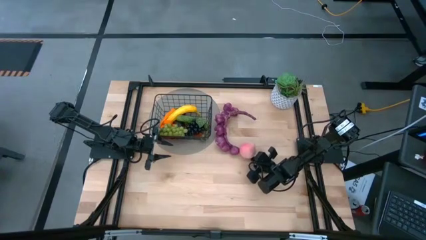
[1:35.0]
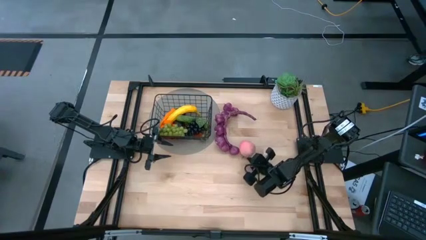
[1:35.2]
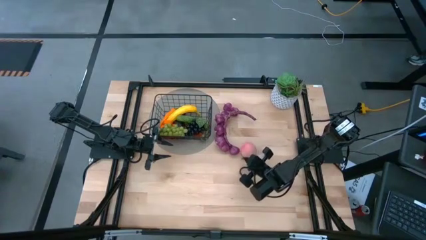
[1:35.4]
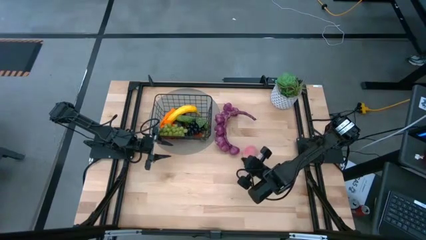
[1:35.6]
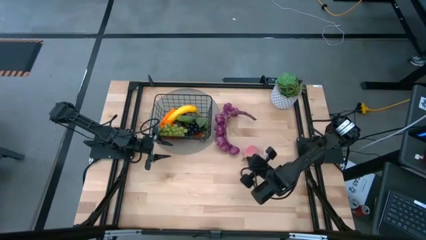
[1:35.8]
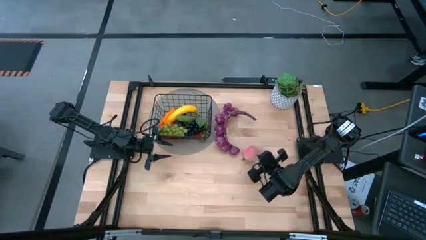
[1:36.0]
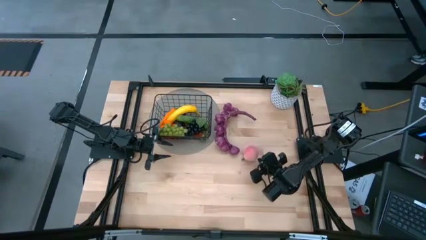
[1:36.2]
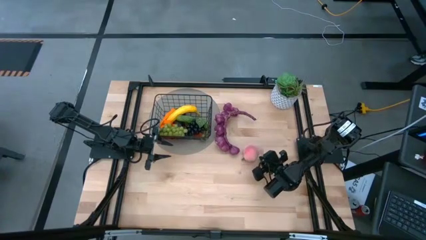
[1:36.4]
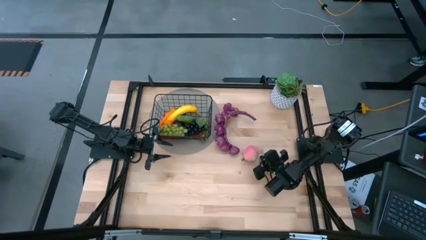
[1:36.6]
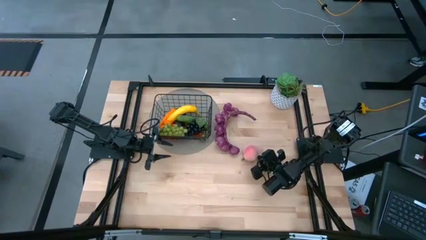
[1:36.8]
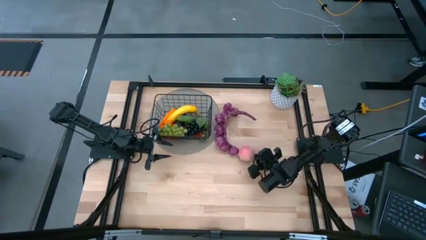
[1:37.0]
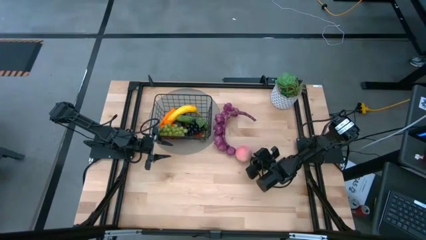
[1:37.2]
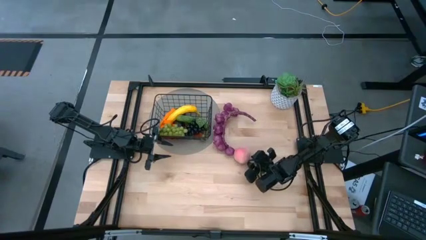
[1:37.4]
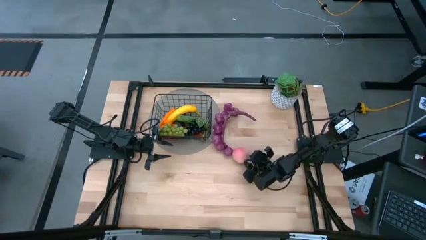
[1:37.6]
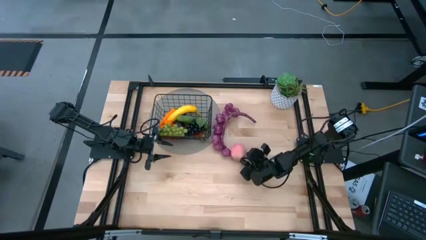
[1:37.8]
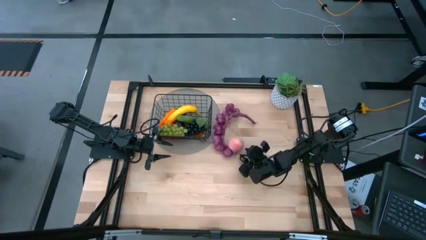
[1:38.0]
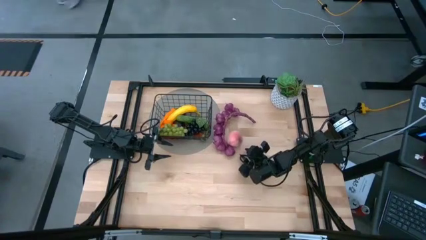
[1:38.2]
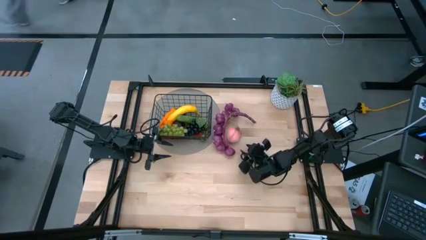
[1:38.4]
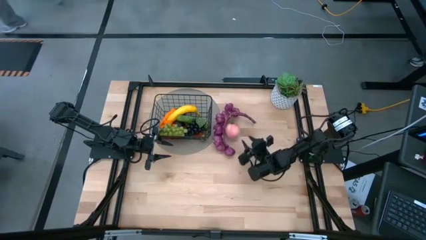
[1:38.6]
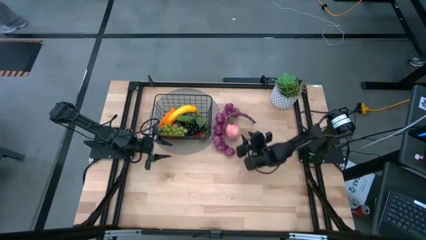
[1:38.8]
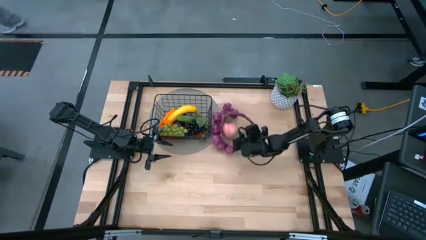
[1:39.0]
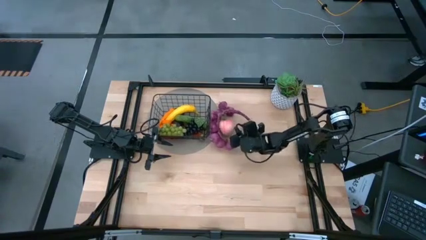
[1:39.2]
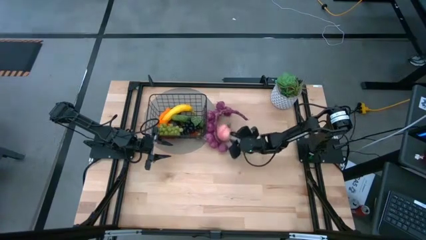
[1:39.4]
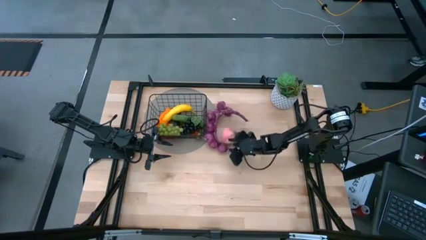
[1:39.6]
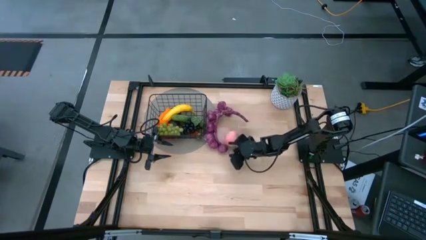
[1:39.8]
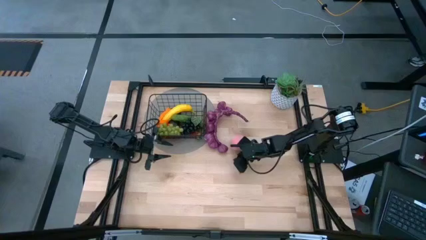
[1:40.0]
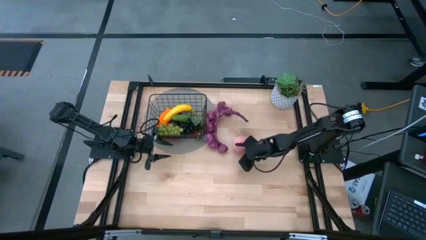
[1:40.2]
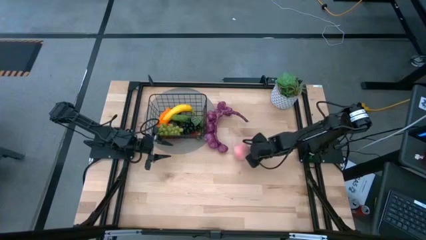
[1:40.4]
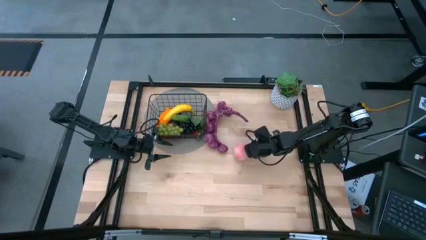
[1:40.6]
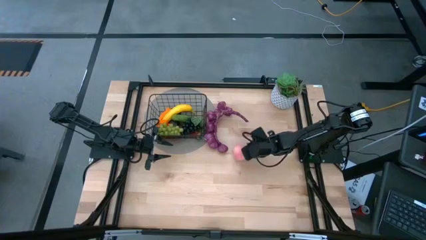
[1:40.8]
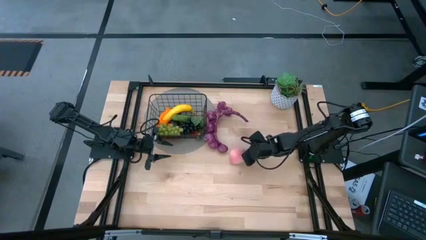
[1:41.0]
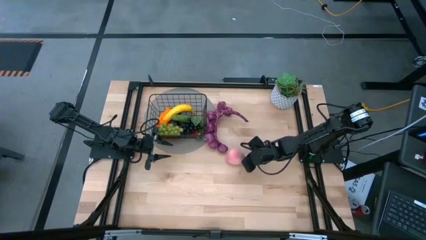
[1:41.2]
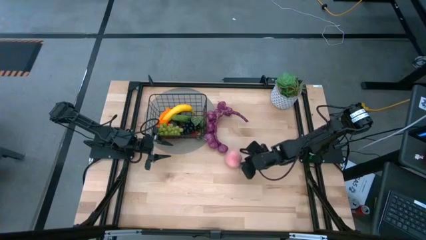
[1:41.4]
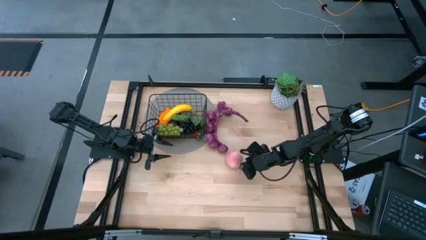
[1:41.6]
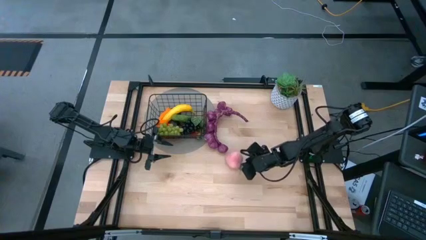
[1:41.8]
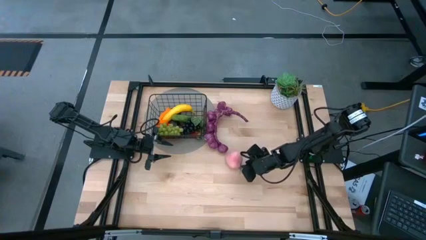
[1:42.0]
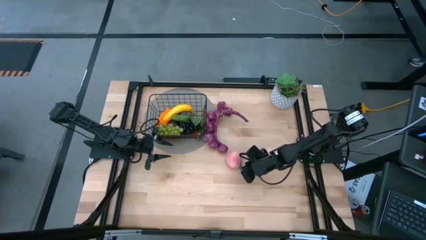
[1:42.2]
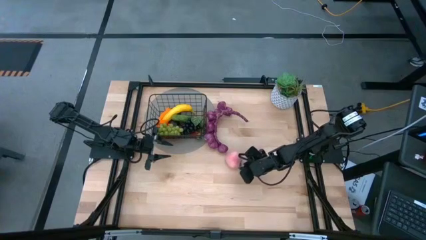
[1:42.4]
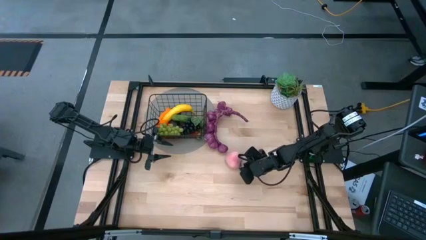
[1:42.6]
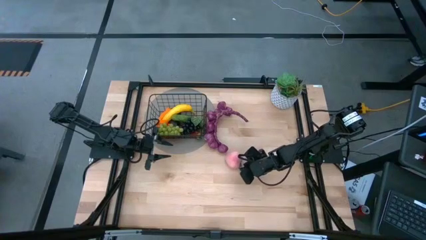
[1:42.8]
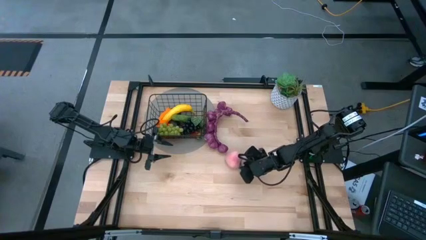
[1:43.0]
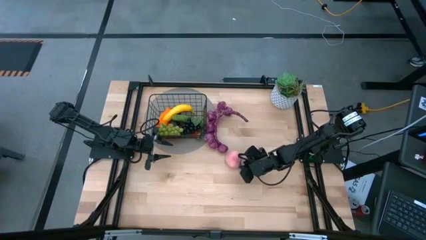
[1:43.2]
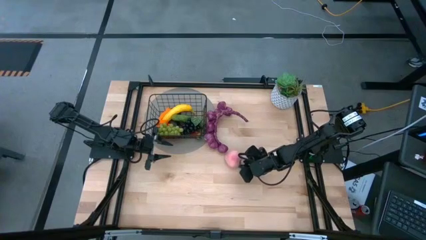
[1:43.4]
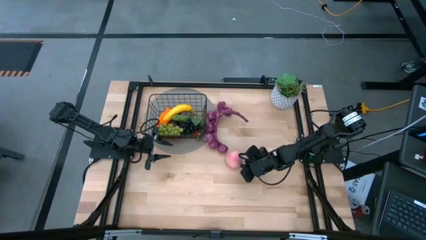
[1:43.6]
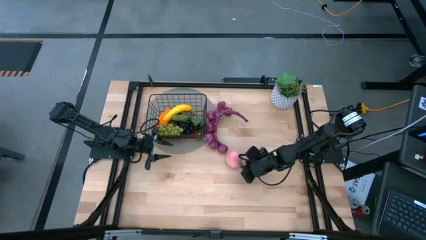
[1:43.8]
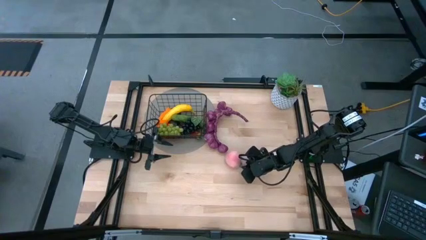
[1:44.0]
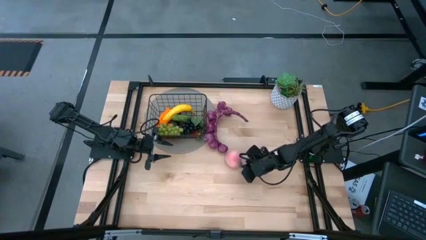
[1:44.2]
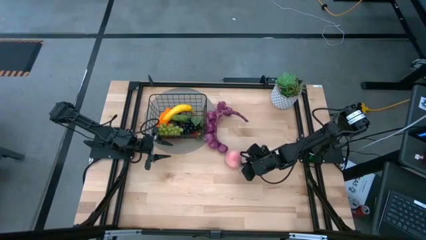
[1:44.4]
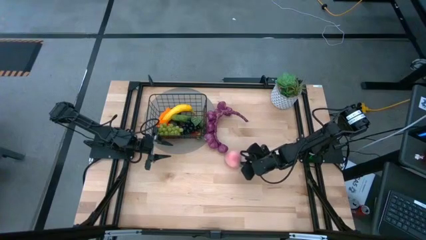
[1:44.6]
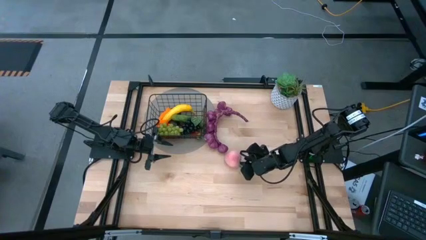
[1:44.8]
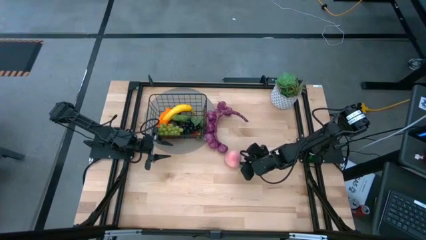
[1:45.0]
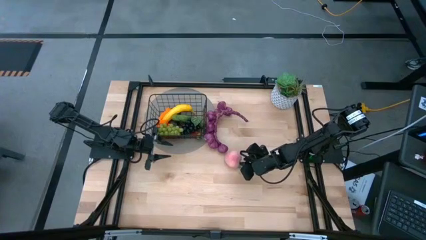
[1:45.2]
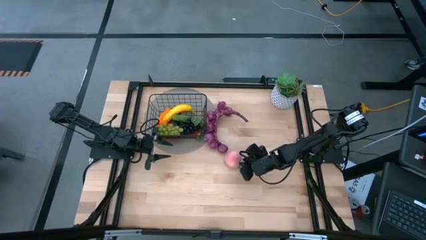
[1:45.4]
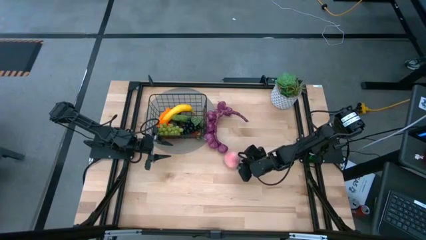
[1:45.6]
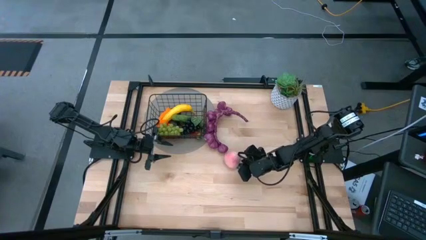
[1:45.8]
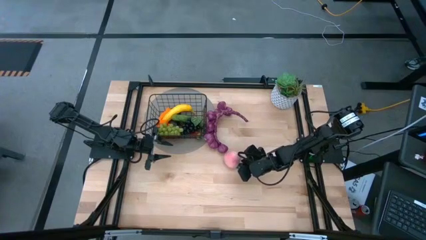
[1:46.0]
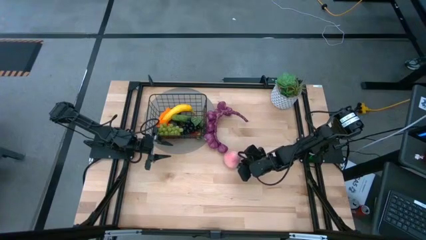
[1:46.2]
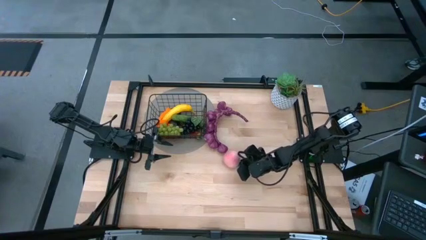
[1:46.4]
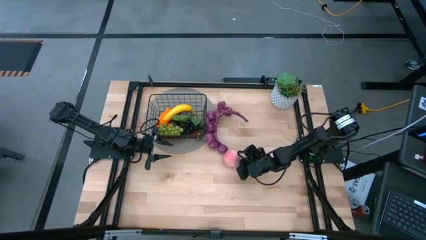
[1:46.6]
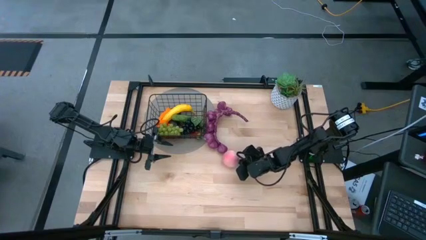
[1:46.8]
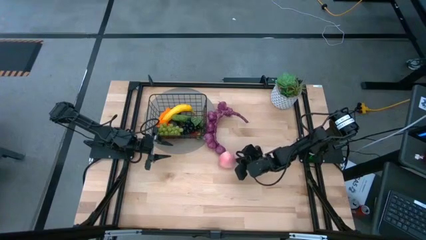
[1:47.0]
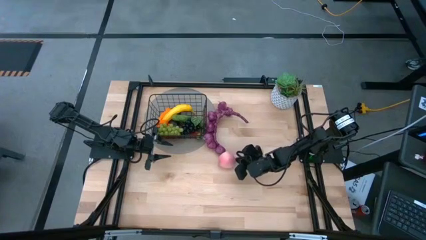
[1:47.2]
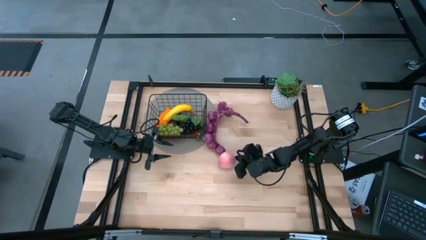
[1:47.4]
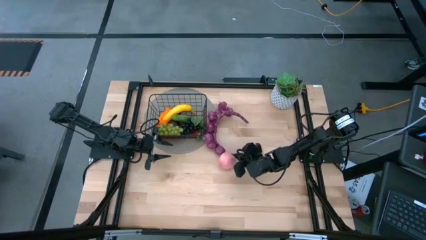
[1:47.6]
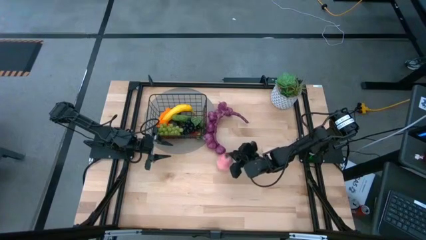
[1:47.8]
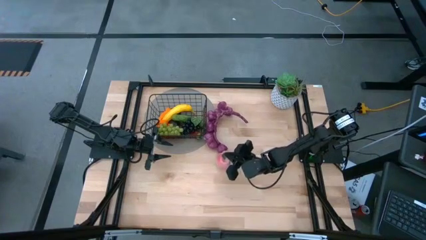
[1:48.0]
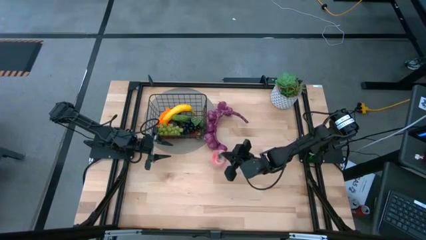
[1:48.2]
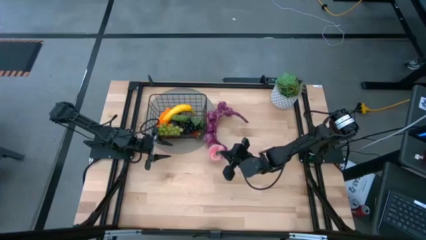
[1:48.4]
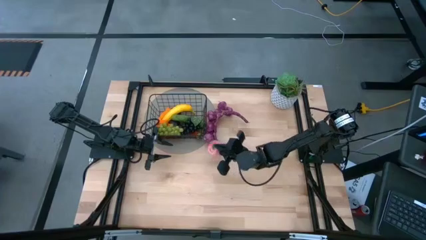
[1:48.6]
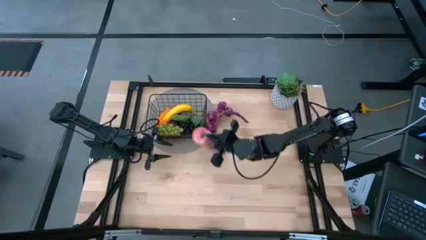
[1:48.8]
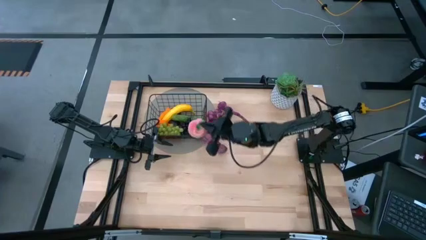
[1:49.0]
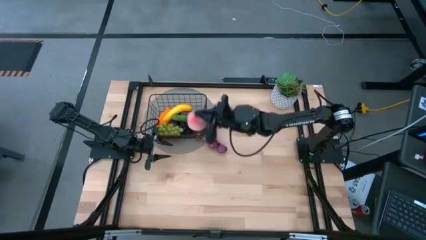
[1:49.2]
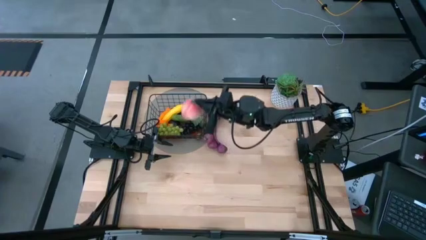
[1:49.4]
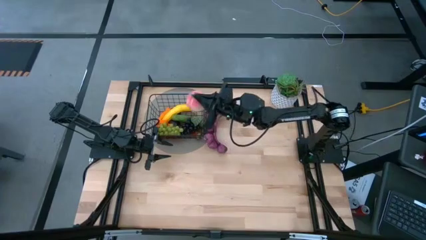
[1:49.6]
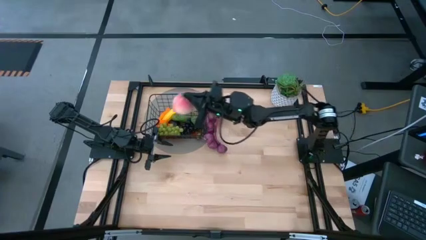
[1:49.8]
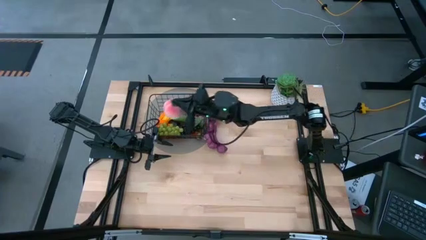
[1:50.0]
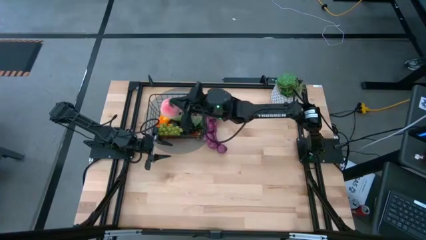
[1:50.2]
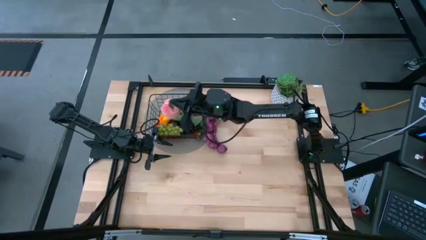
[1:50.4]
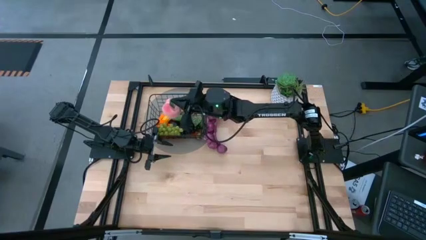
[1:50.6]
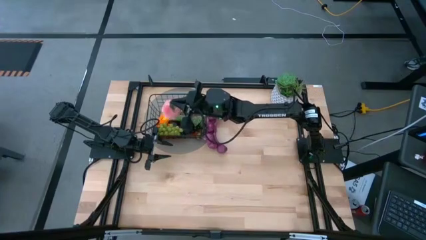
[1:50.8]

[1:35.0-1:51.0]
Task: Build produce basket
Put the peach into the wire basket
